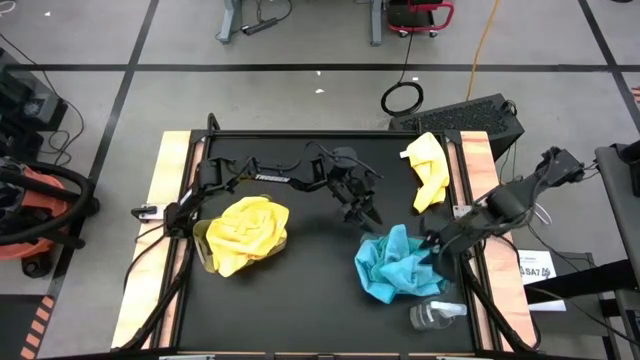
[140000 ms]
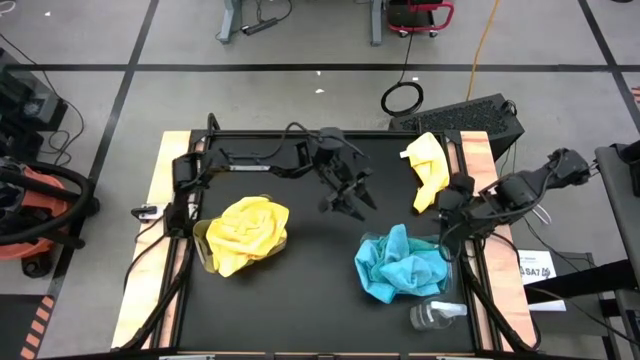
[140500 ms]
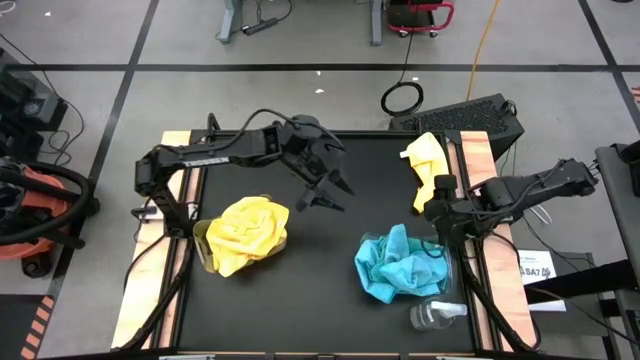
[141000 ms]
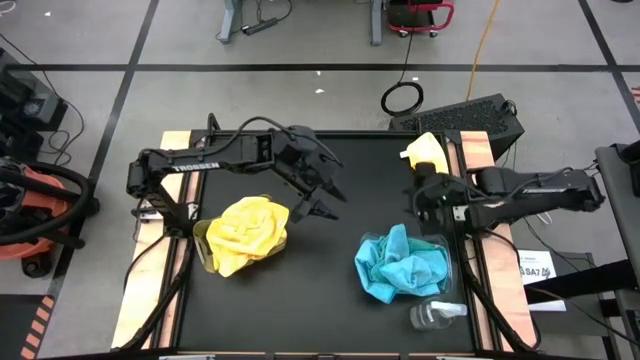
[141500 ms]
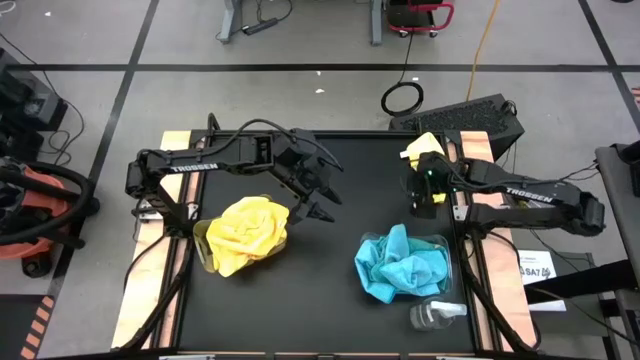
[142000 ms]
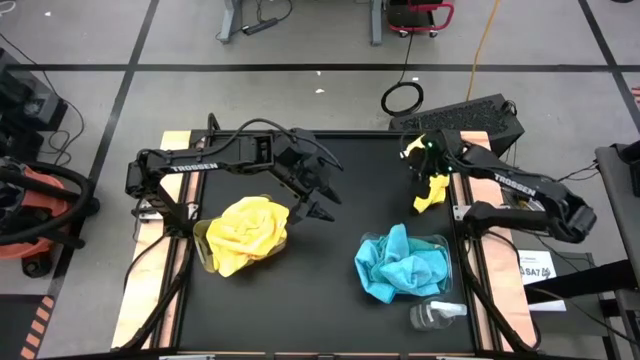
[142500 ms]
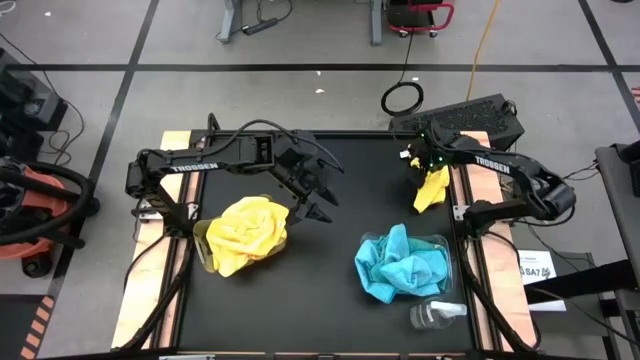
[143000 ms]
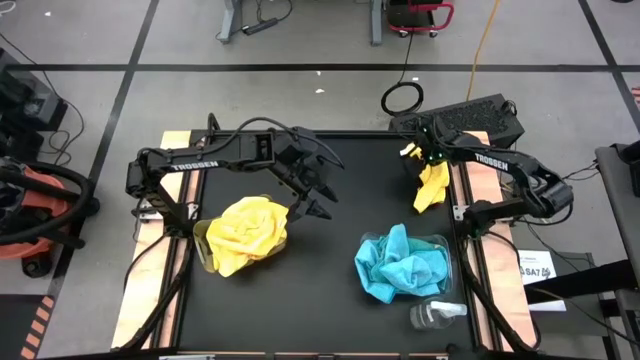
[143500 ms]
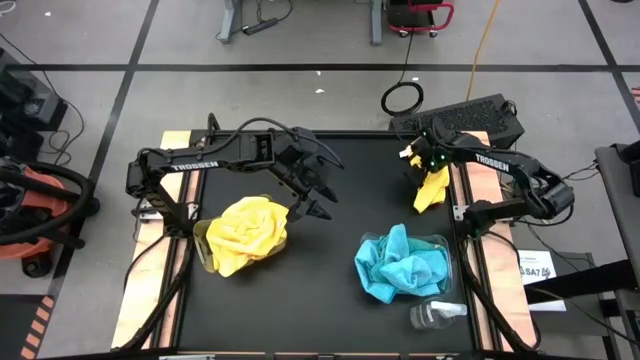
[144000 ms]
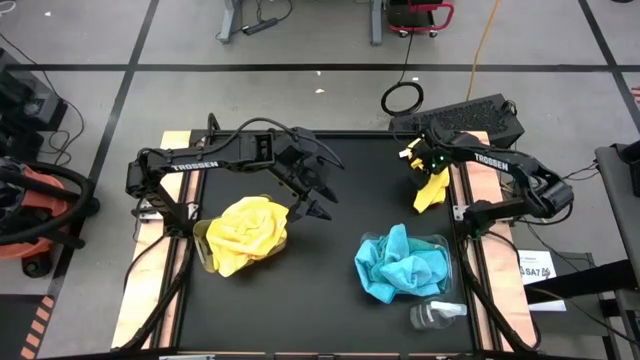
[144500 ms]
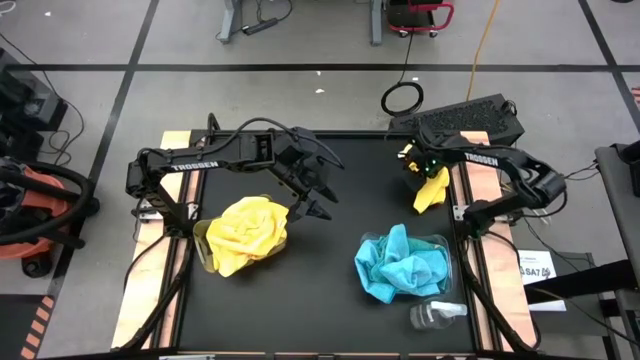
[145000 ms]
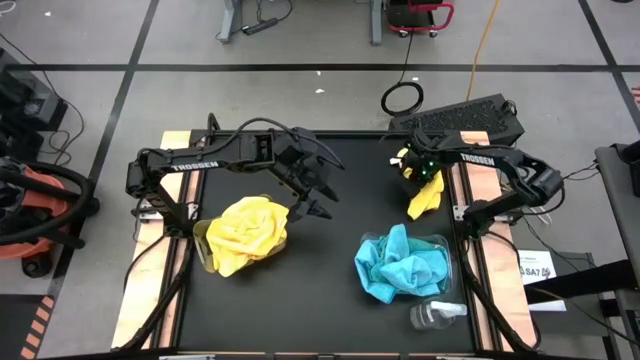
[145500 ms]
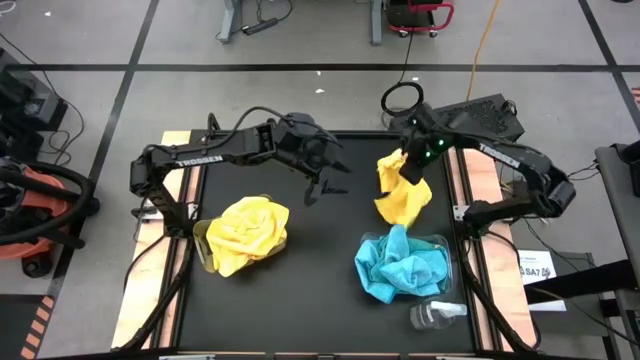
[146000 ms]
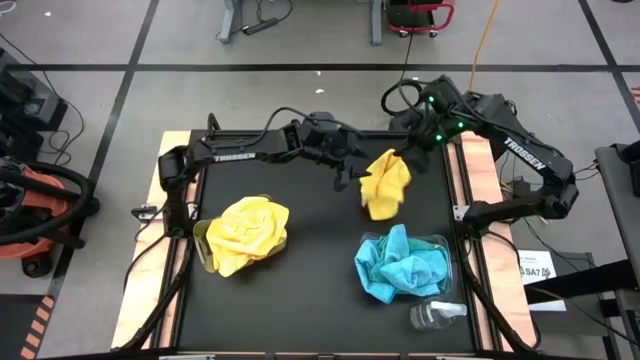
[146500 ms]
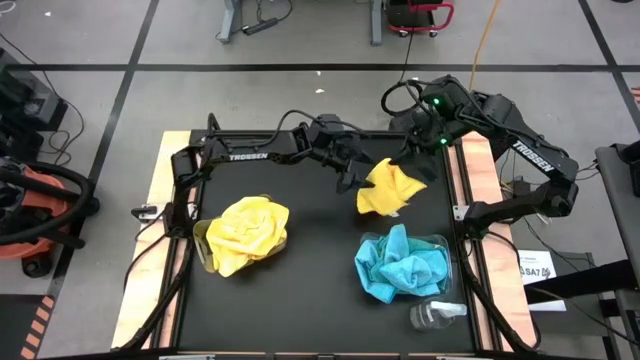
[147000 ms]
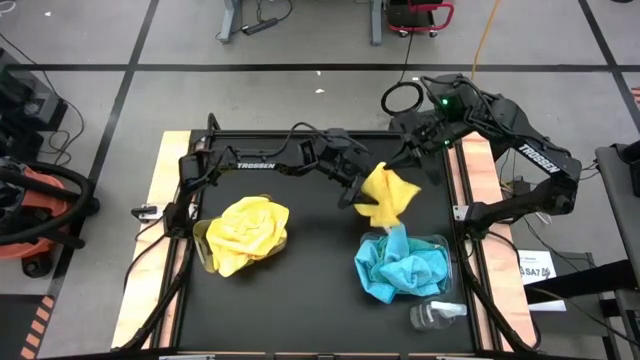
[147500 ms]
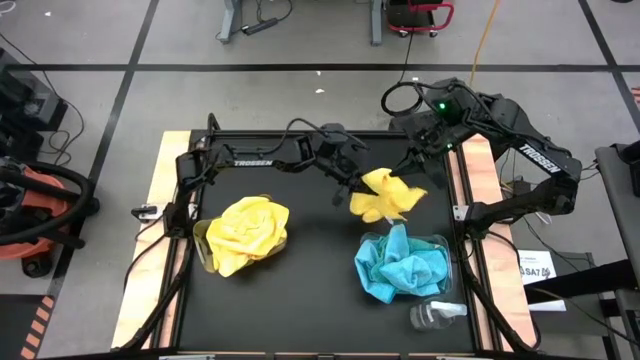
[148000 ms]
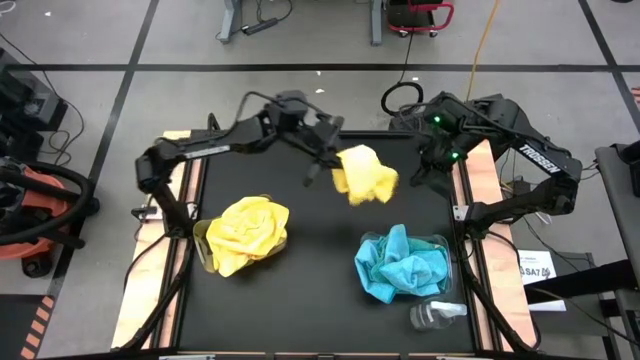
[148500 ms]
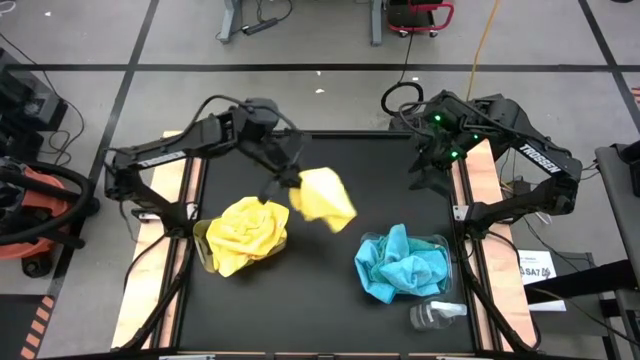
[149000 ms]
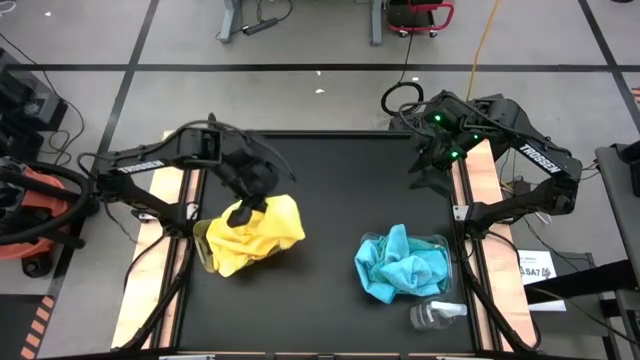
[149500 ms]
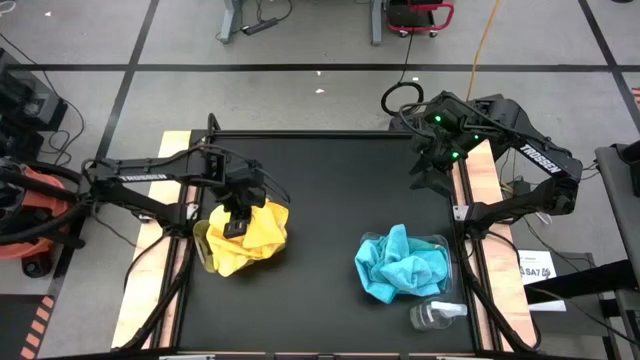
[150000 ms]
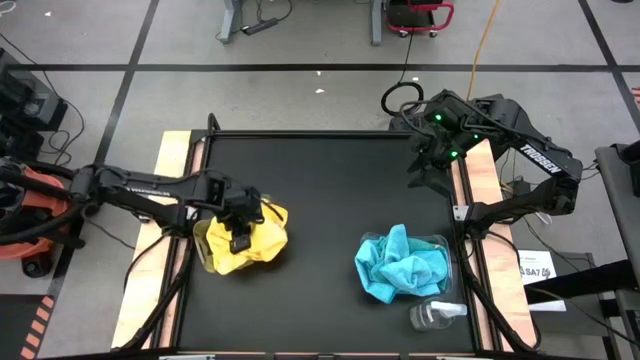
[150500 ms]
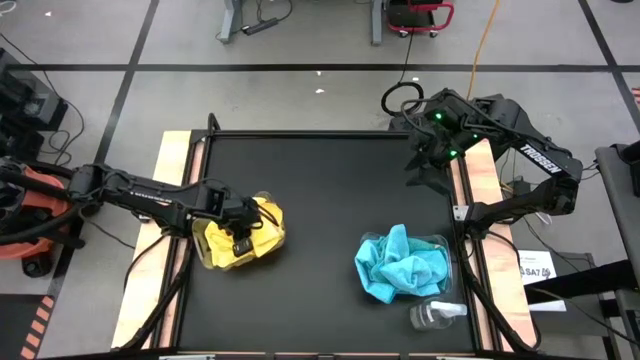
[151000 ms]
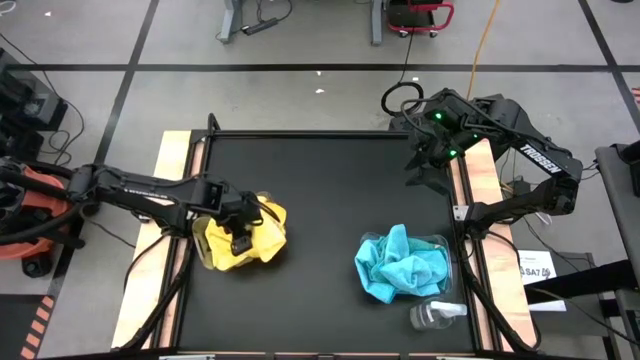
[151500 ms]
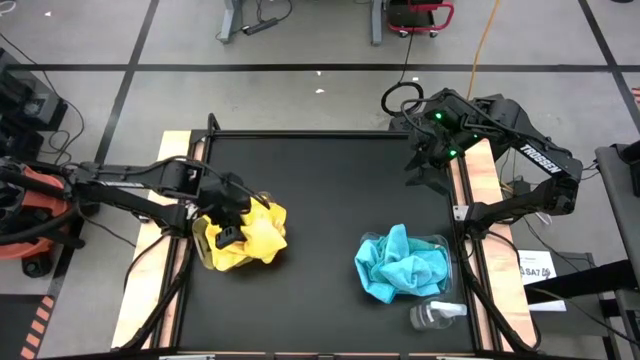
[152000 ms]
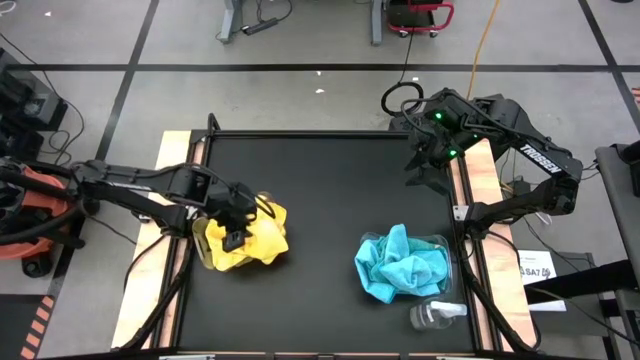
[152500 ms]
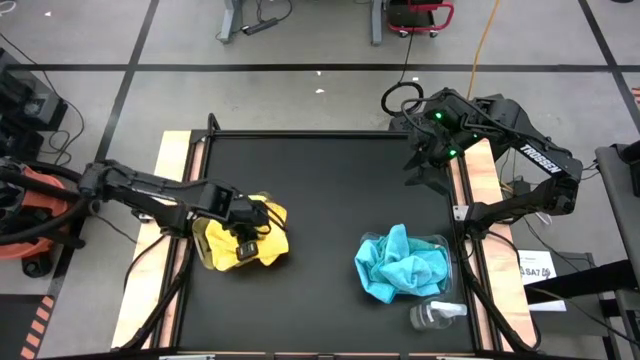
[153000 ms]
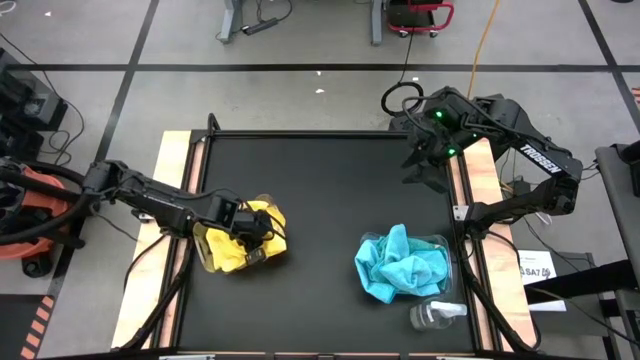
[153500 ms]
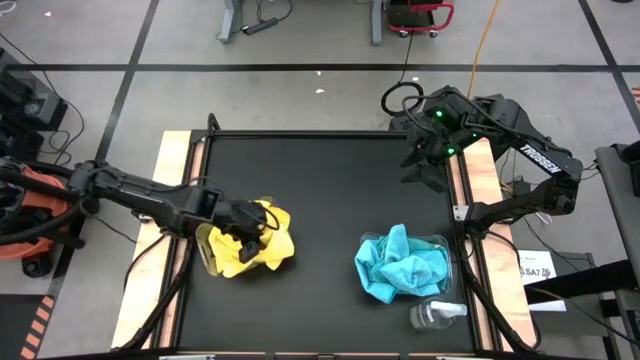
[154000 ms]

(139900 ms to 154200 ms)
Task: Sort microfiber towel by color & place in baskets
Put the yellow microfiber towel into the left transparent bin

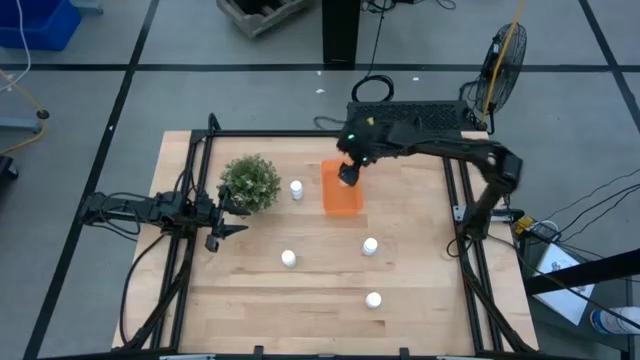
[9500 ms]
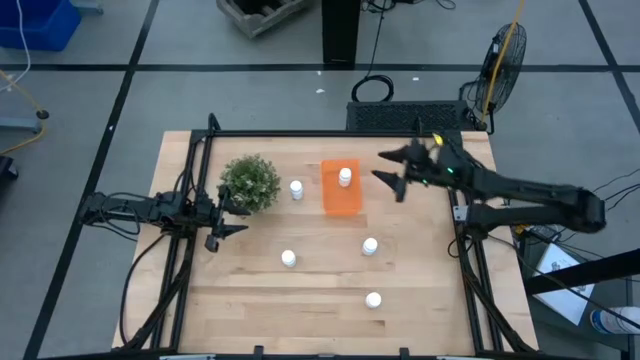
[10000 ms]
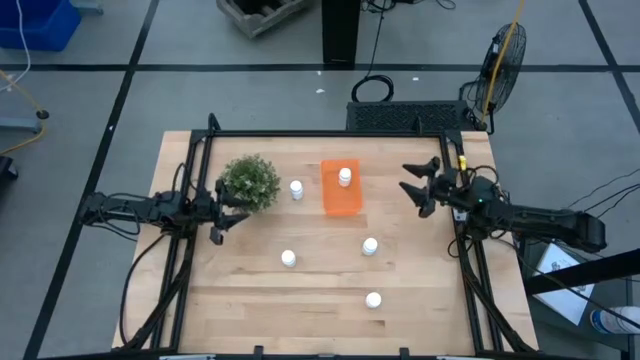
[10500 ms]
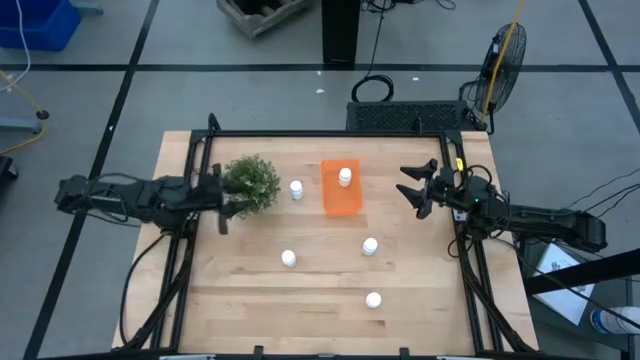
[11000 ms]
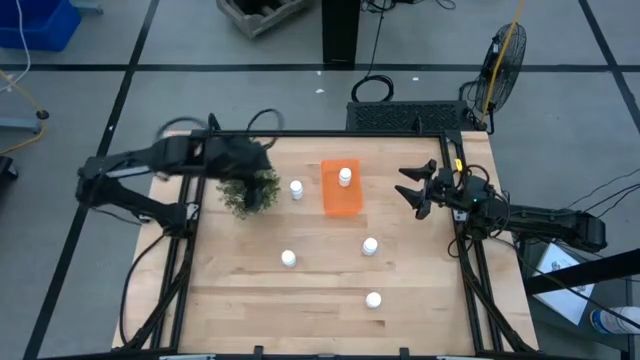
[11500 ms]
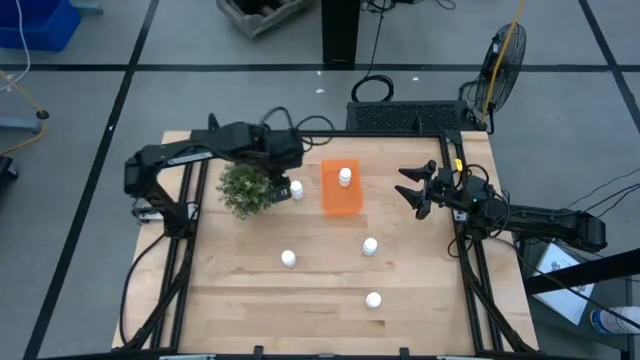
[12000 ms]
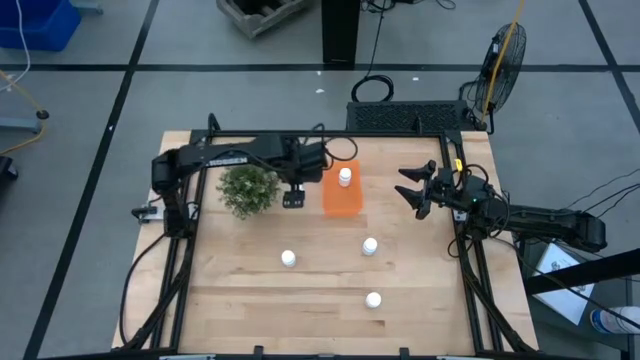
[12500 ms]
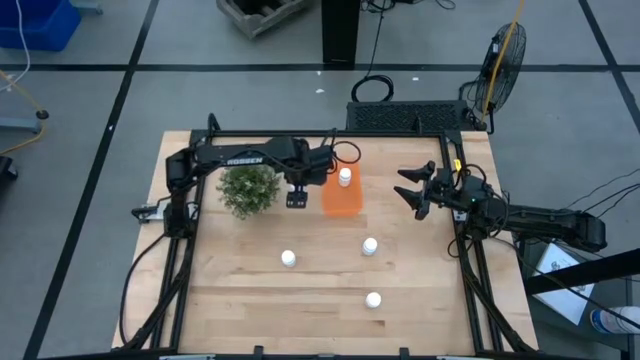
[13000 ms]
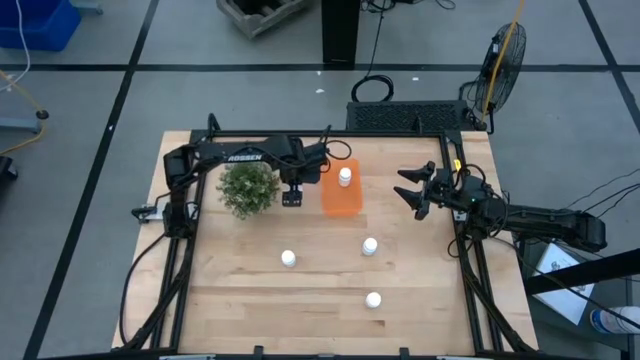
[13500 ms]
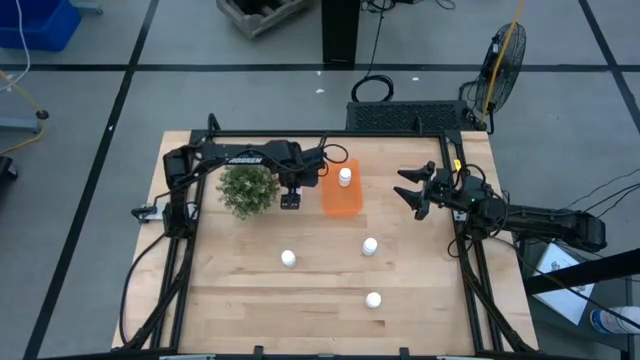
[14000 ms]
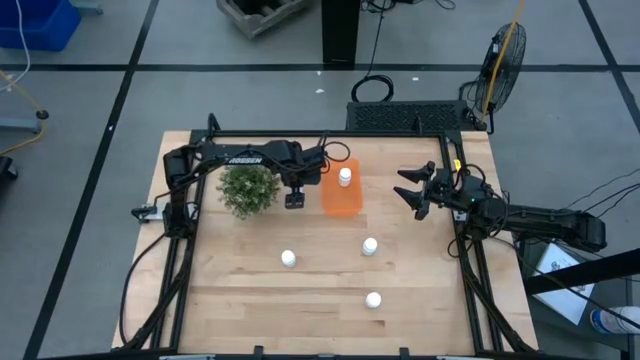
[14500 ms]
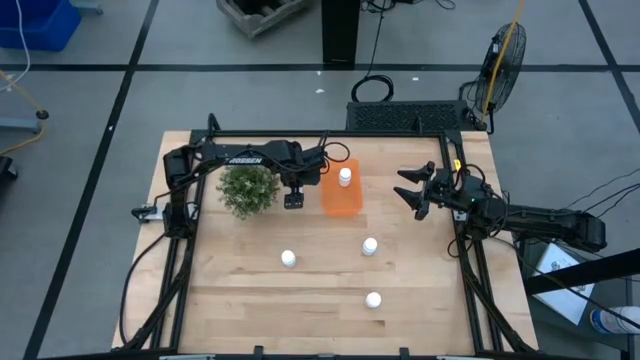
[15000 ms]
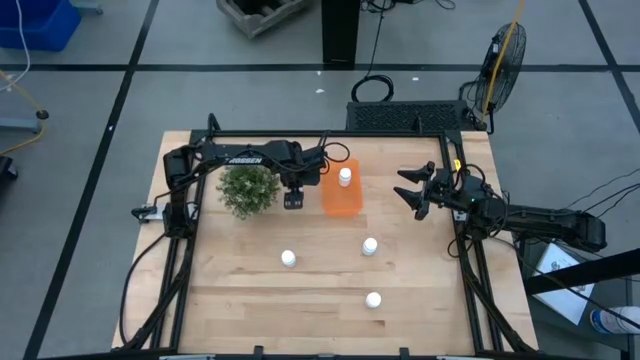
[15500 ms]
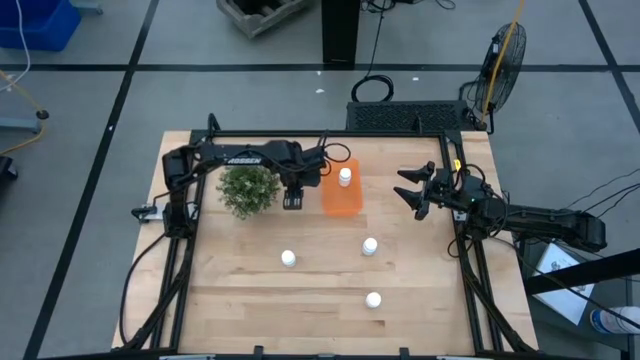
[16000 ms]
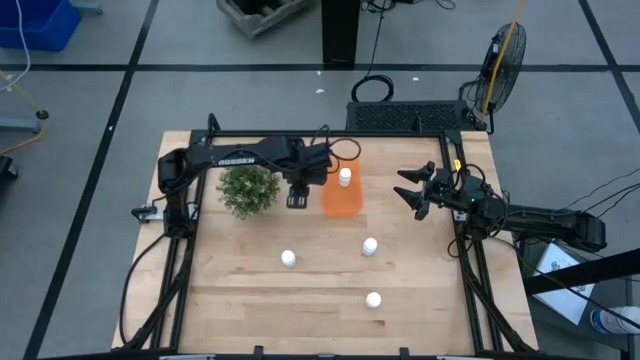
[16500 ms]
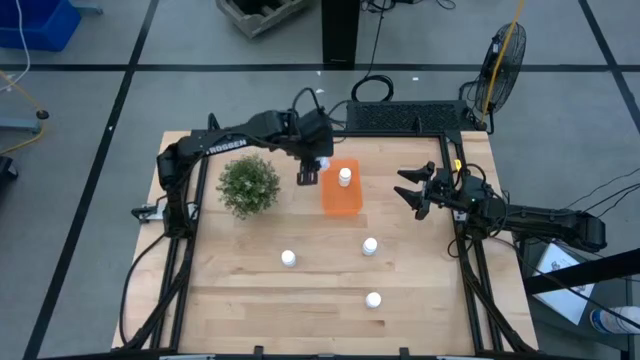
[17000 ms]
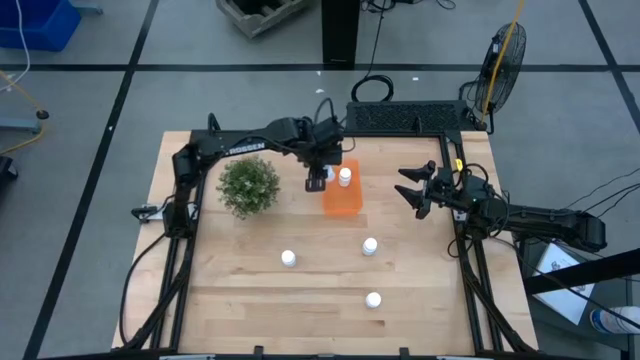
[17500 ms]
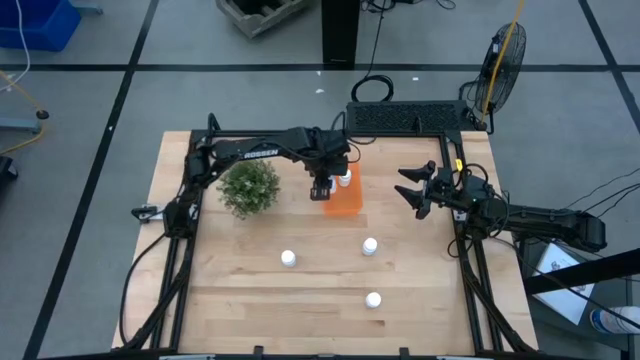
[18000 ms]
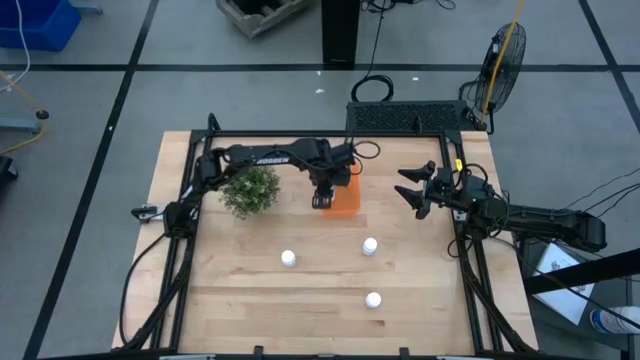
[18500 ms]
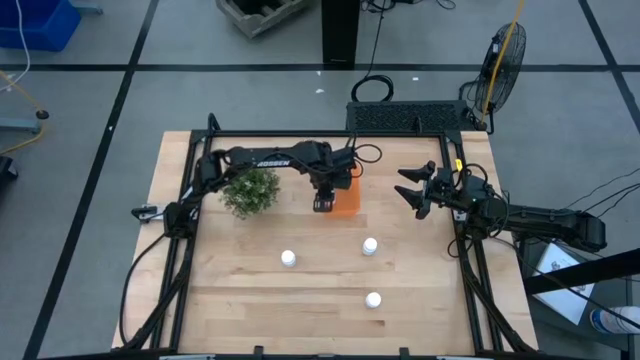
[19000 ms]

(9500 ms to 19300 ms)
Task: Pick and place pill bottles into a basket
Put the white pill bottle into the orange bin
